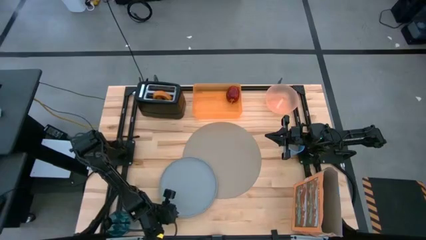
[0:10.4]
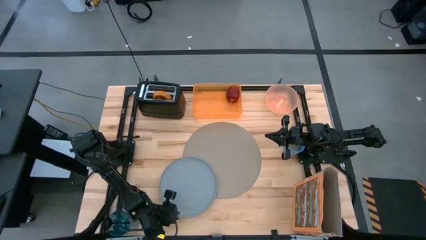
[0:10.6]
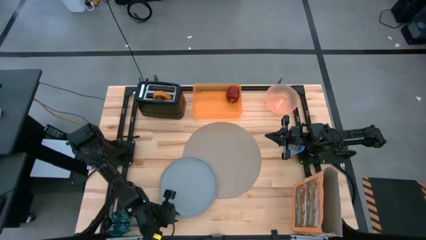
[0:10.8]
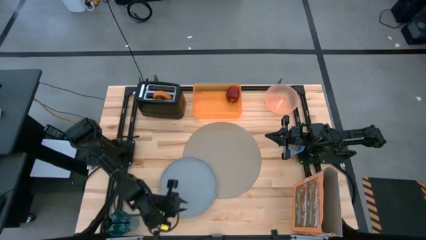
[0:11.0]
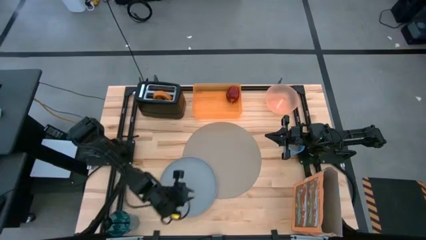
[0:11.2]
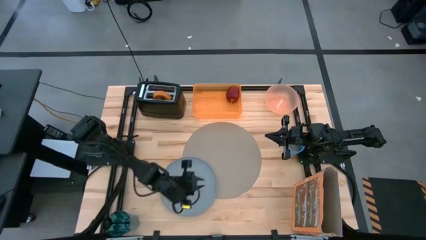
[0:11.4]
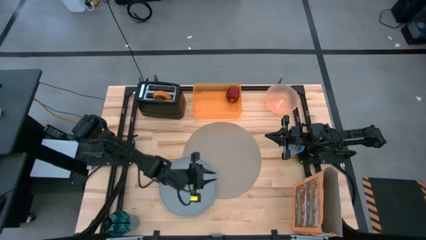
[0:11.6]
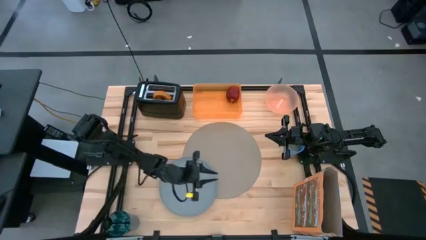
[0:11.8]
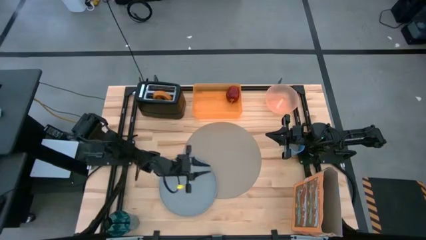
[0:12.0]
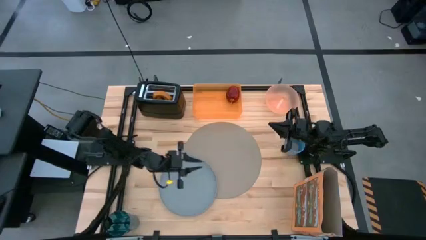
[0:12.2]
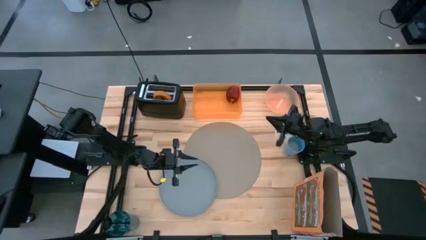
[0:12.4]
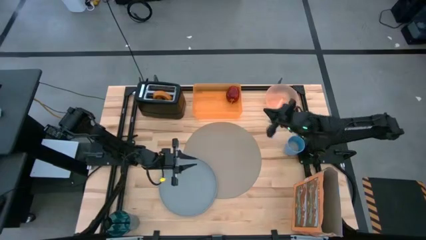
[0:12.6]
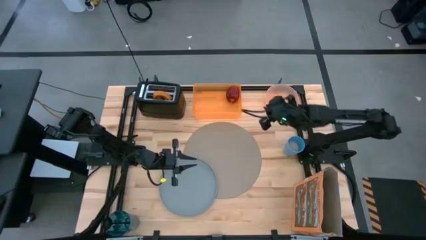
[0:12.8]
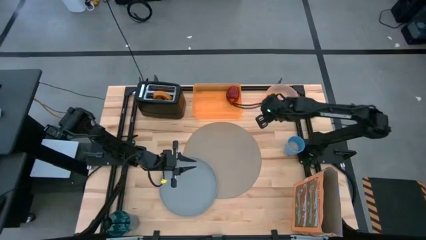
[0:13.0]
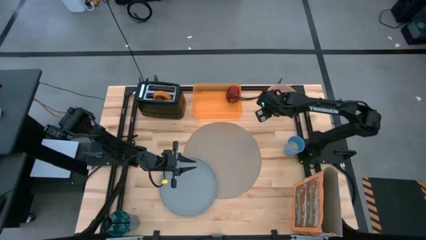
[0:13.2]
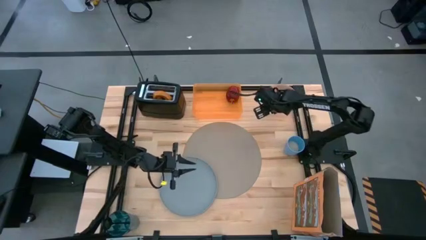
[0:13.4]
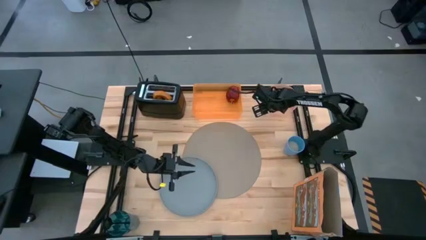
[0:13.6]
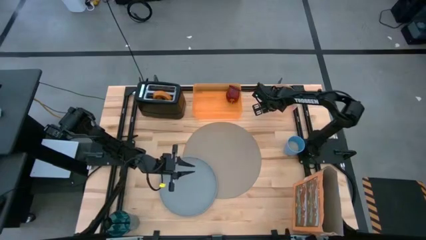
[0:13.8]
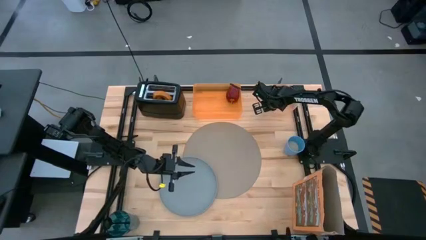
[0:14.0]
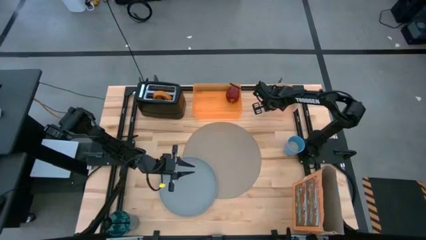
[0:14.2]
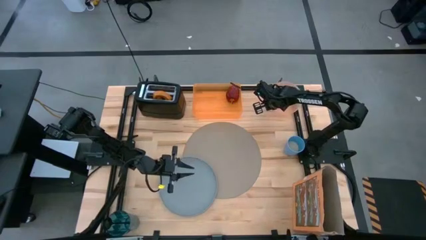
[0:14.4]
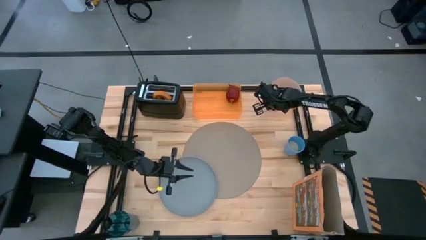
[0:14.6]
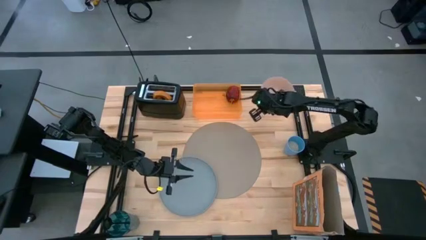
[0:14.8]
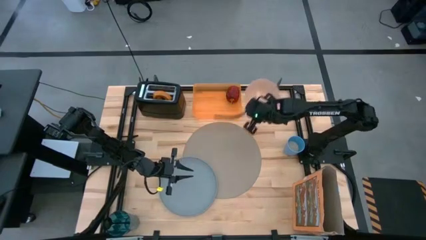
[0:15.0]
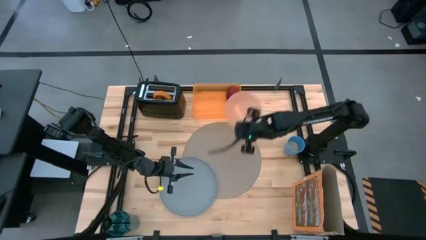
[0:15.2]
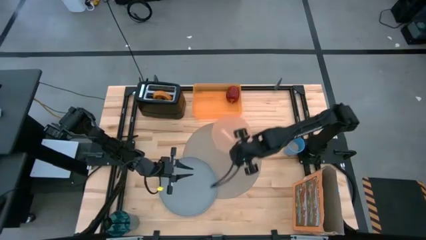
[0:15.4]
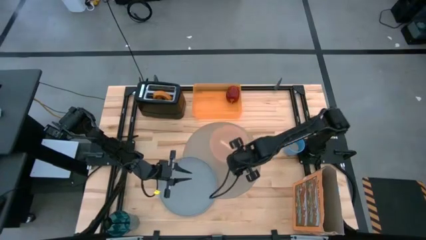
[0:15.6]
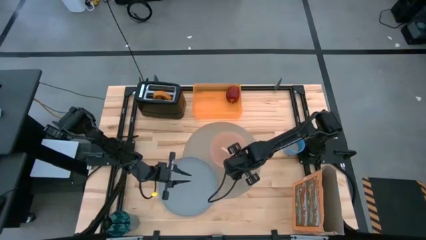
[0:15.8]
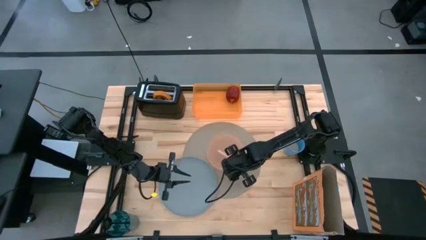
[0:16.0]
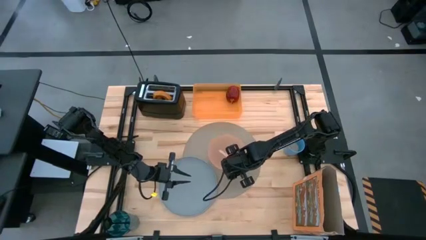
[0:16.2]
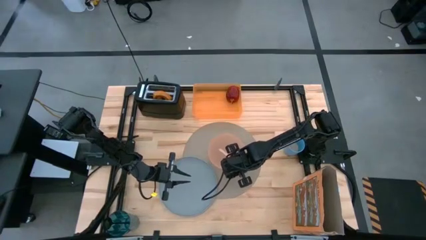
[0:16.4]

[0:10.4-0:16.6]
Task: Arrange a breakfast setting
Put the light orange bowl on the brown table mat

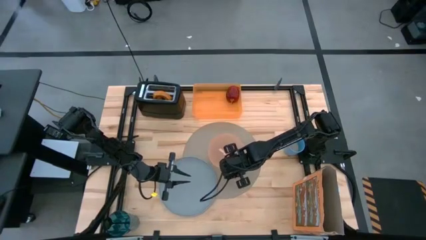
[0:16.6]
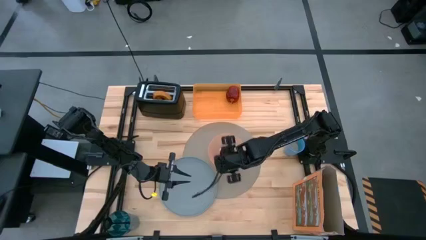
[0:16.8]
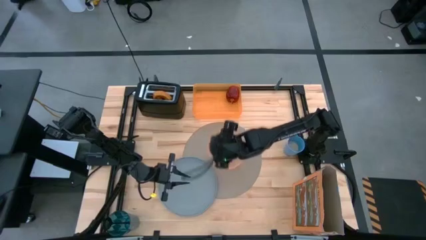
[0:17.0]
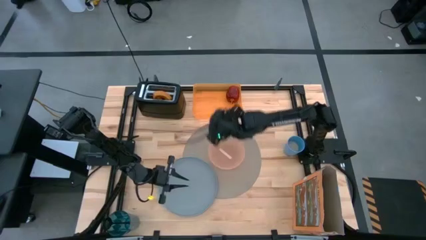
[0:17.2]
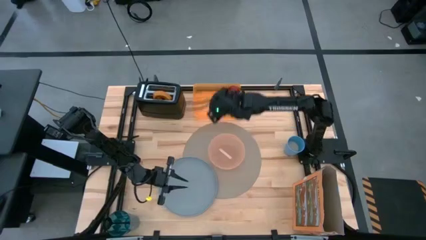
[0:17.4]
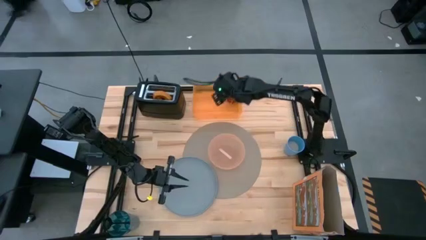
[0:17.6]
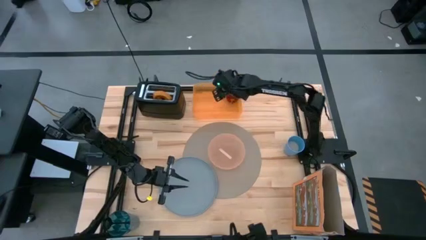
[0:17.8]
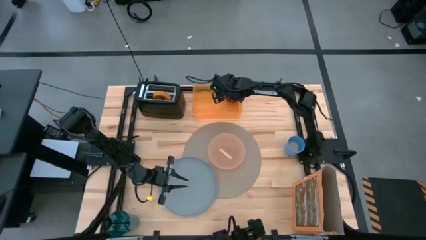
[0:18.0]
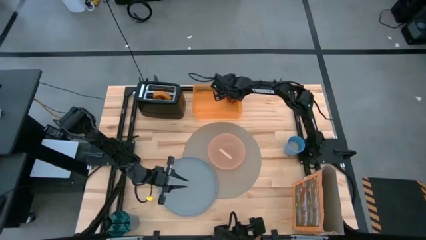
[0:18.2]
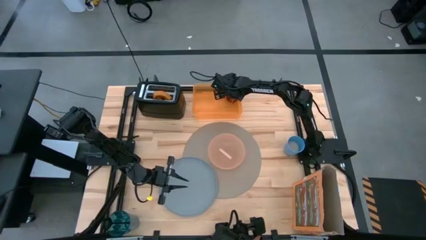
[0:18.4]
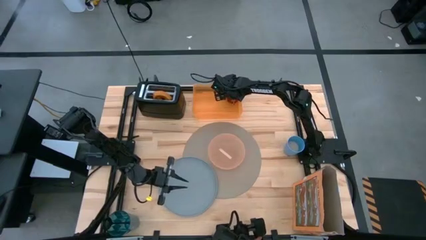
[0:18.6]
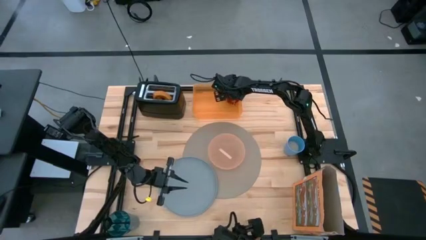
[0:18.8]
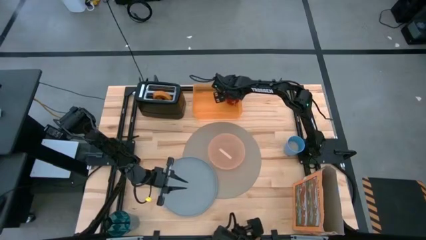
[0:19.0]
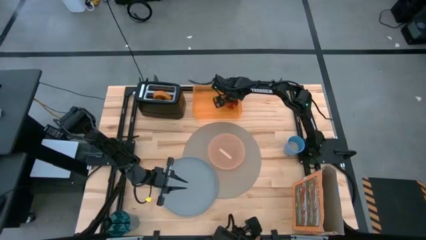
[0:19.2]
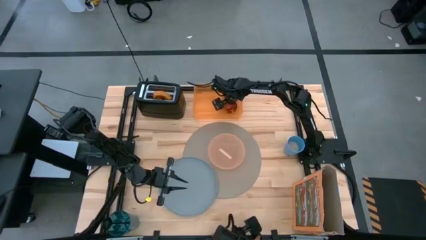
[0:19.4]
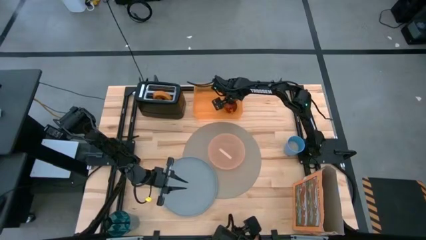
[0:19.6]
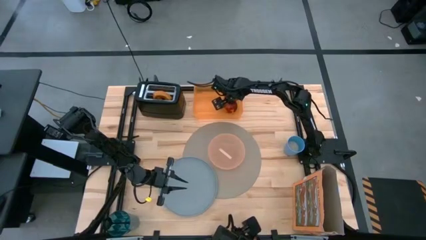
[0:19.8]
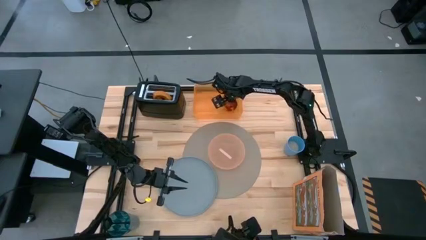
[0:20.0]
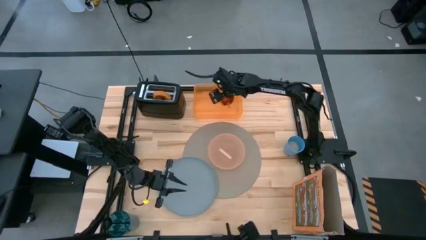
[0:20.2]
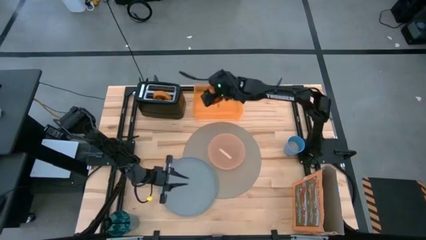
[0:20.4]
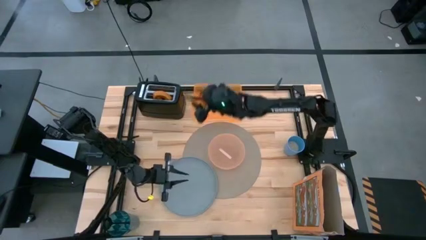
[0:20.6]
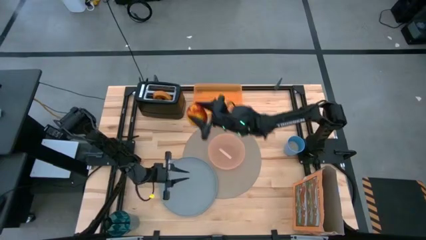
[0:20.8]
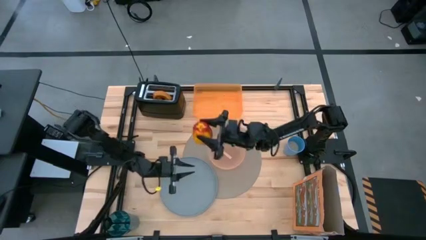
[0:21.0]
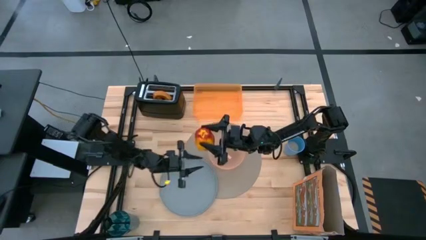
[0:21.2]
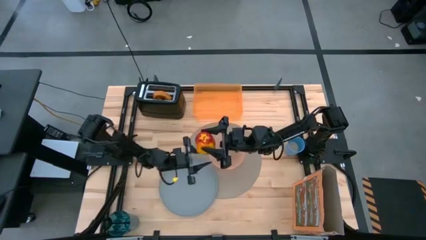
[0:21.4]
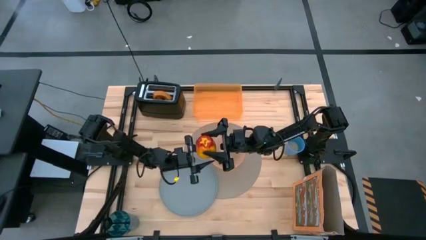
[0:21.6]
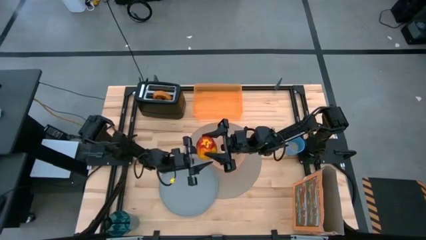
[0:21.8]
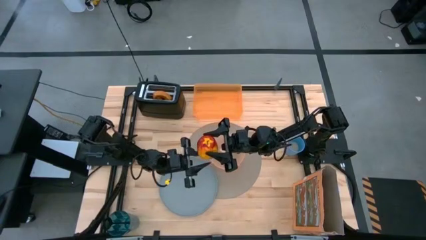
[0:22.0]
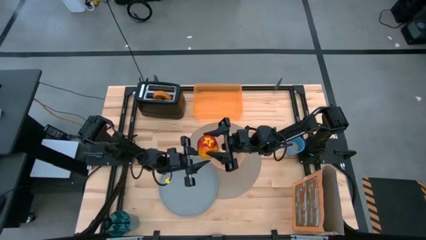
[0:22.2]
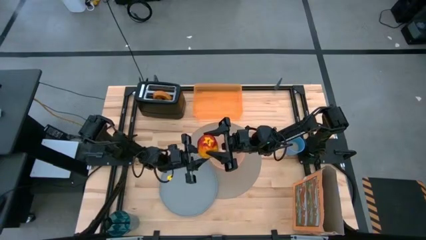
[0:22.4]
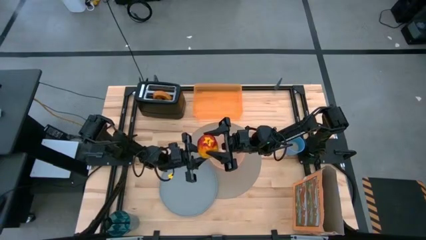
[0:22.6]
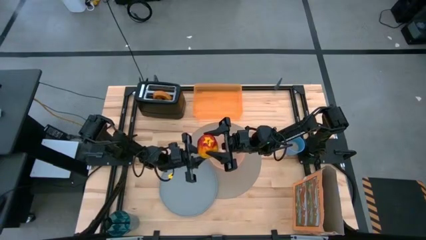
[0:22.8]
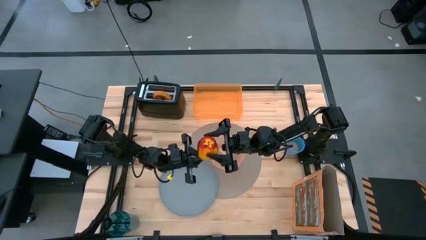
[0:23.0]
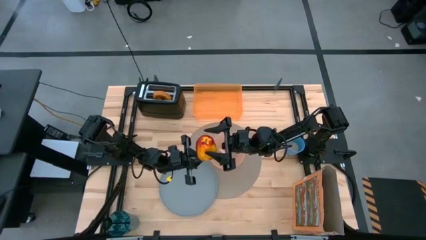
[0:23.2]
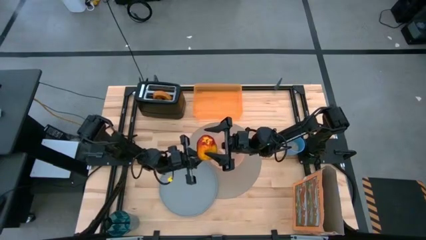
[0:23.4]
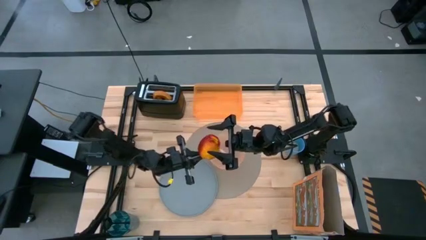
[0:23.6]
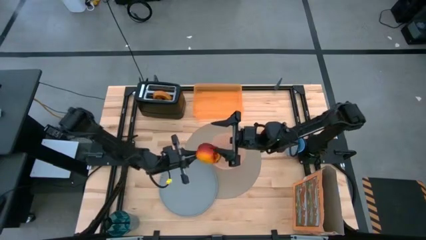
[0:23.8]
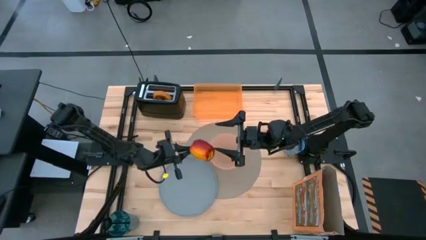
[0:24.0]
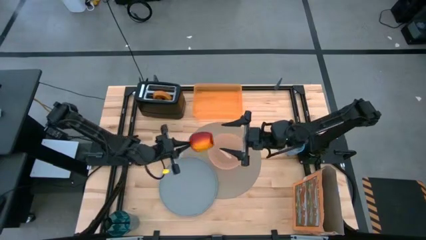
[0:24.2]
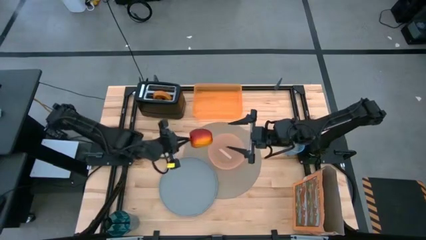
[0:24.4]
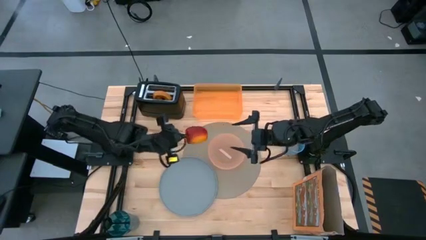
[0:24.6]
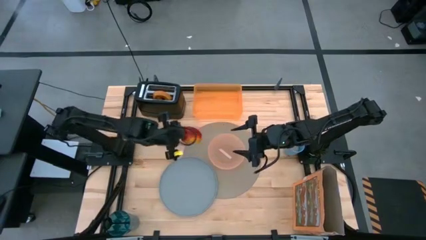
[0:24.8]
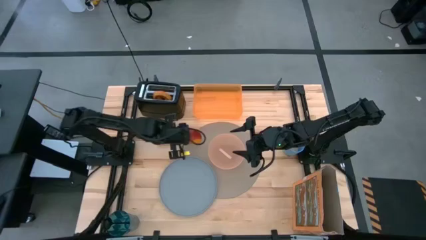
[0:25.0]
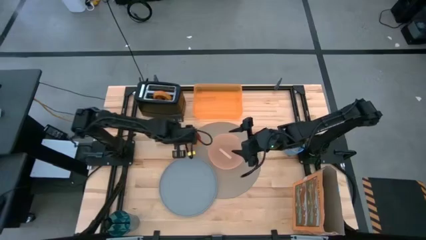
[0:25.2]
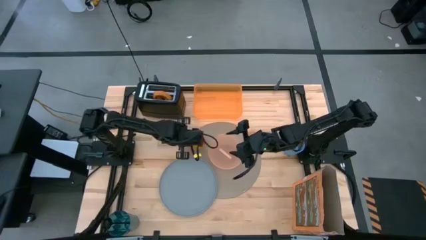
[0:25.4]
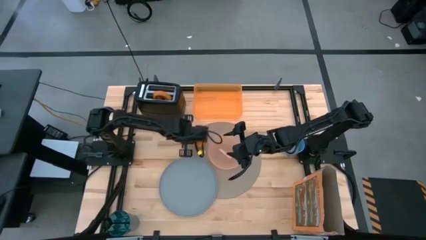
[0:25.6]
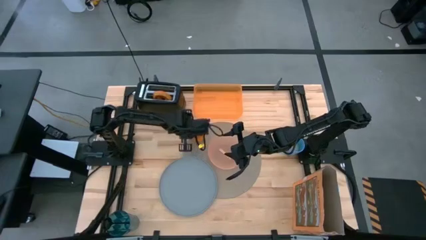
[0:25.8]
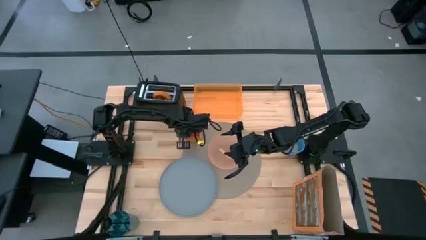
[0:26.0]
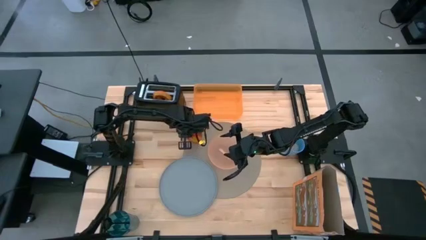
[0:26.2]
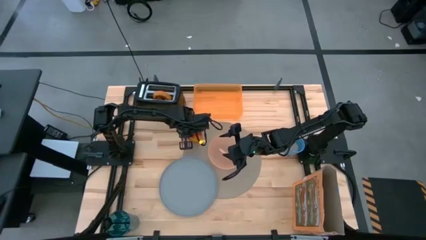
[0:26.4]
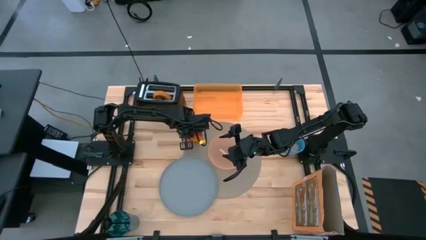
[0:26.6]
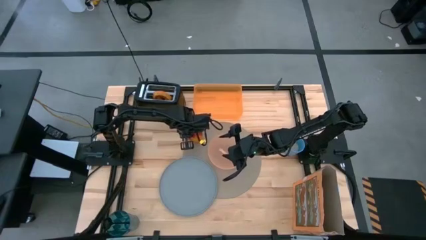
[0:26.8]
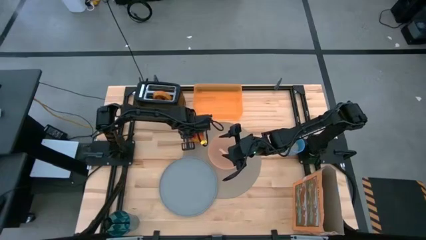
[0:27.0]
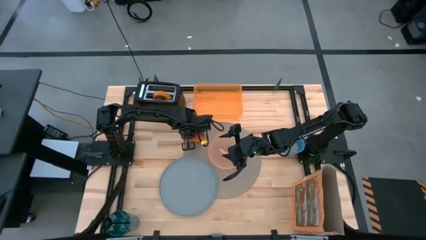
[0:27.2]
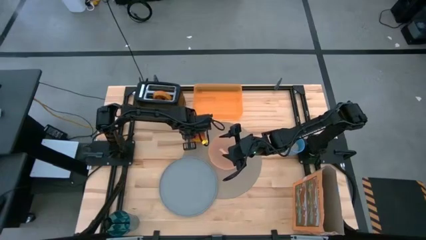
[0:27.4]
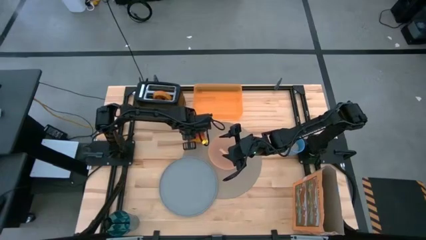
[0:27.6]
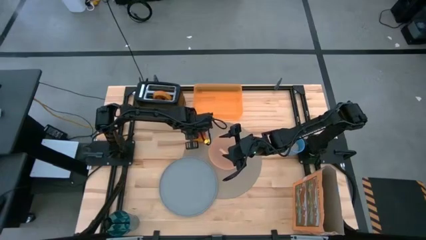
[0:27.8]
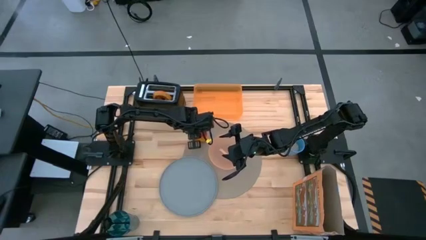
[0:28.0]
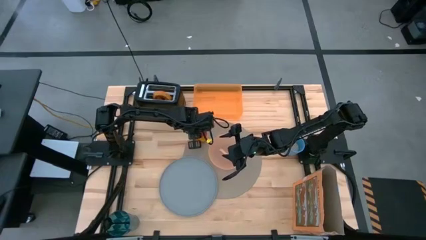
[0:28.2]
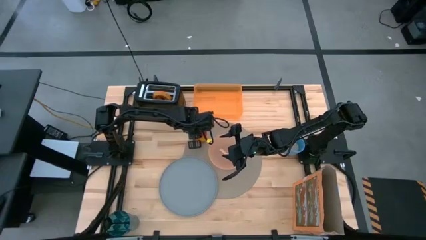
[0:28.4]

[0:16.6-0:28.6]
Put the red apple from the orange bin to the top left of the brown table mat
